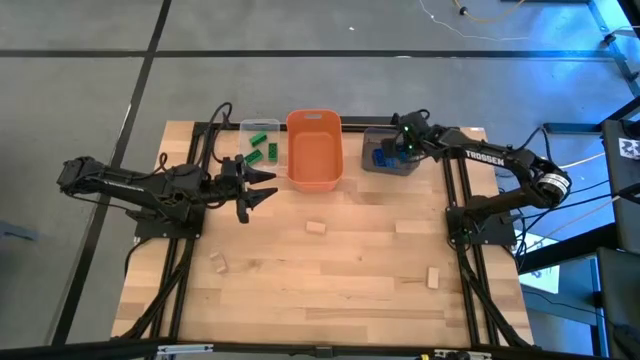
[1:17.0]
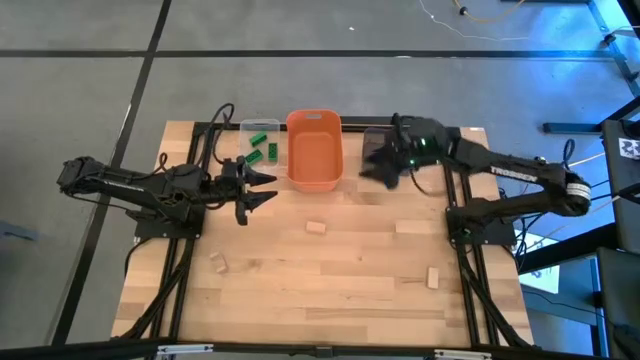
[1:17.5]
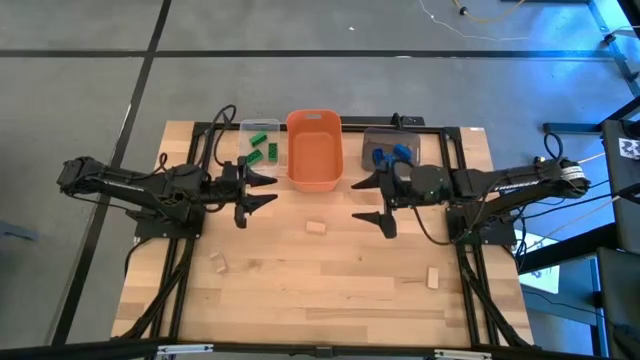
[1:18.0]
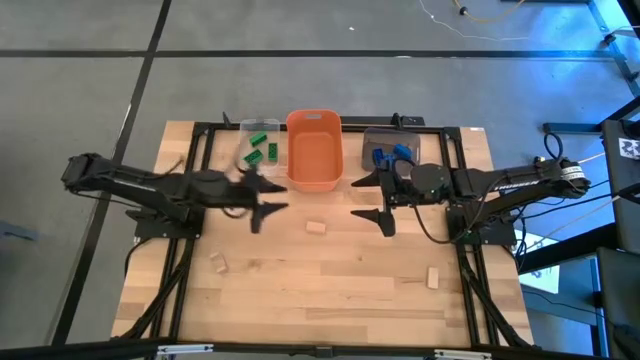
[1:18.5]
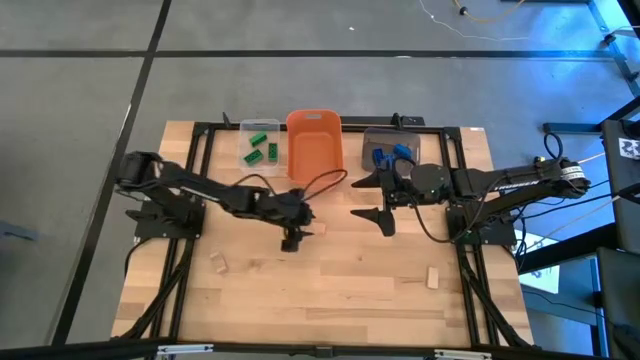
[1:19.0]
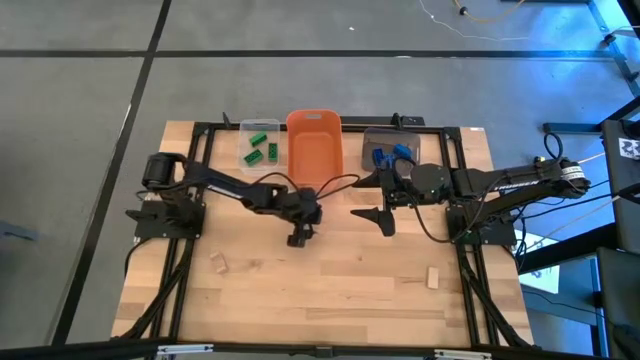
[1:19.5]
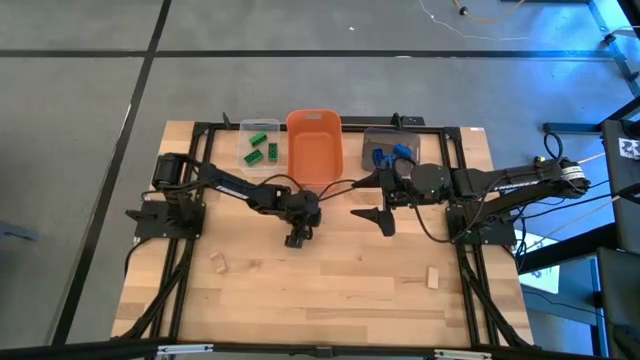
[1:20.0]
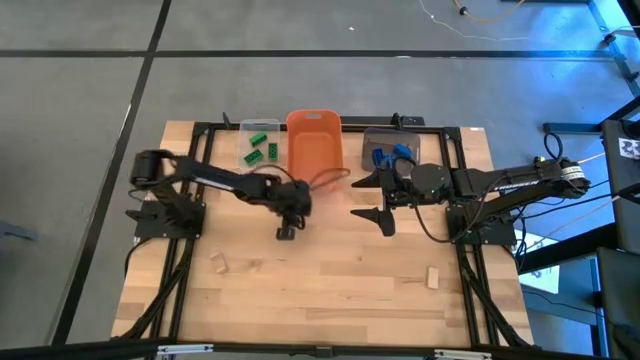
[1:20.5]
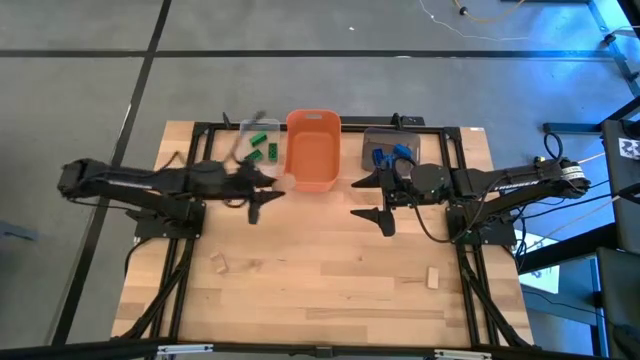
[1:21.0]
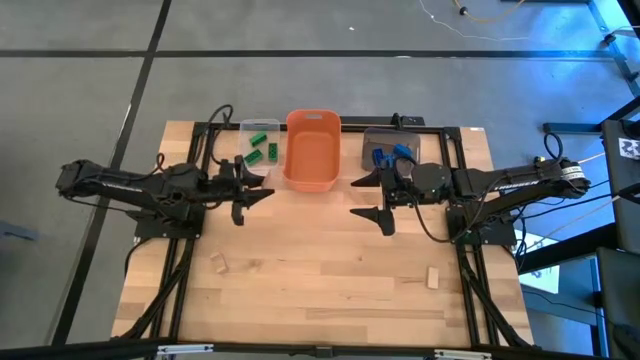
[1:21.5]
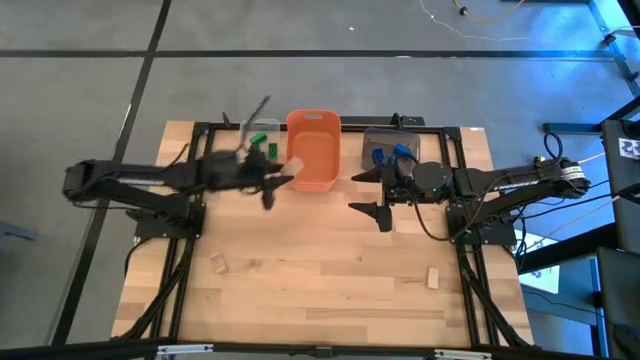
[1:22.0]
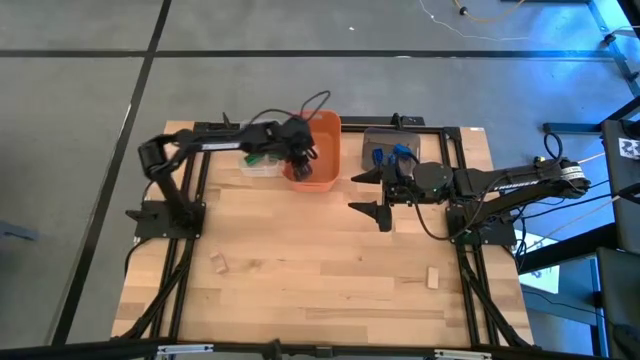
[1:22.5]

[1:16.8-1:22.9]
Task: Sort & place blocks by color
Put the top brown block into the orange bin

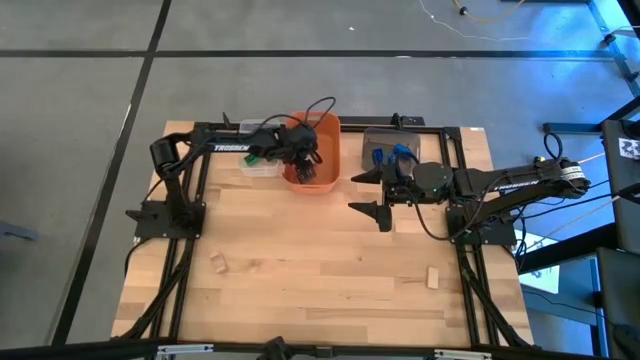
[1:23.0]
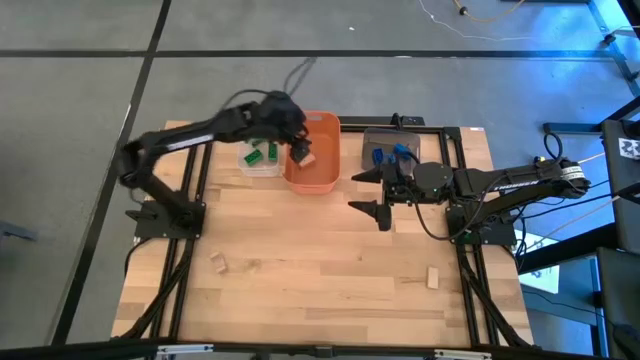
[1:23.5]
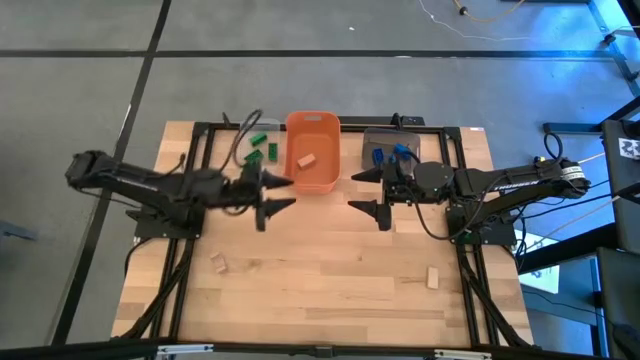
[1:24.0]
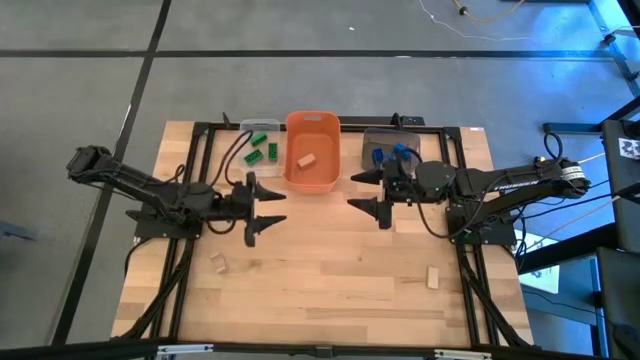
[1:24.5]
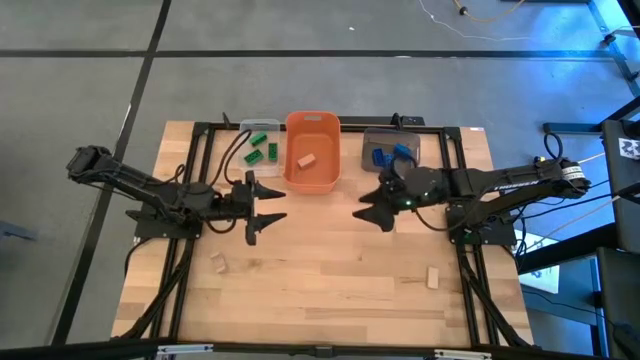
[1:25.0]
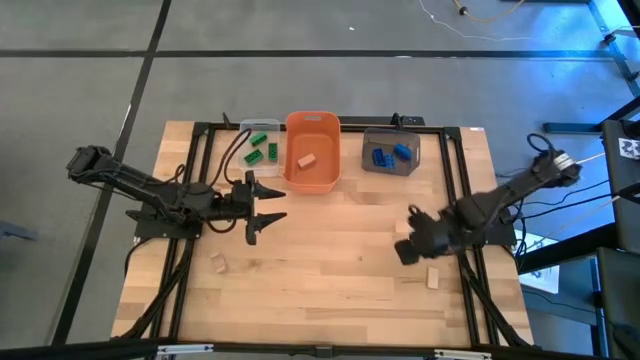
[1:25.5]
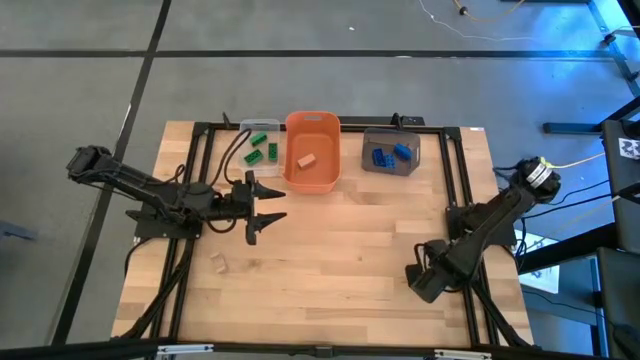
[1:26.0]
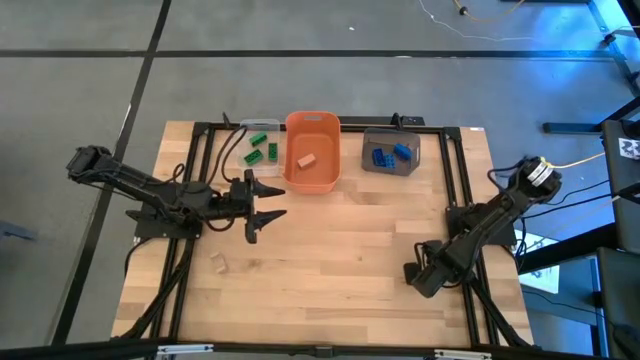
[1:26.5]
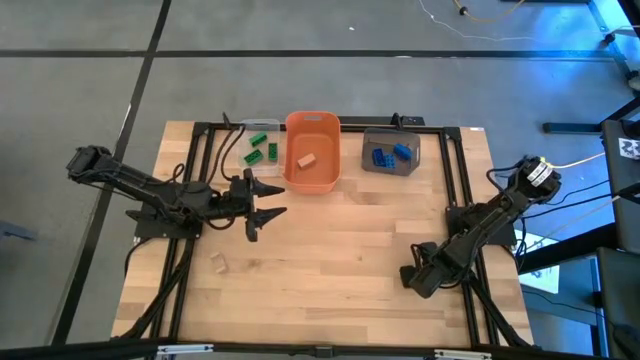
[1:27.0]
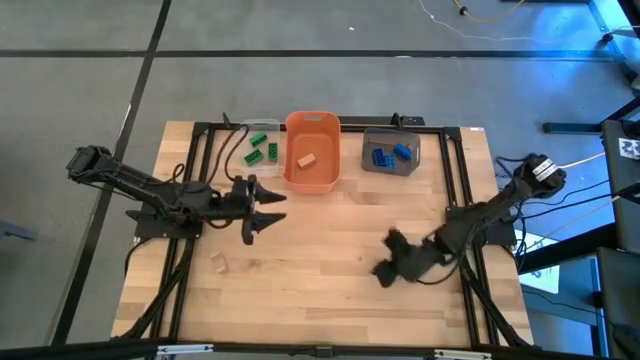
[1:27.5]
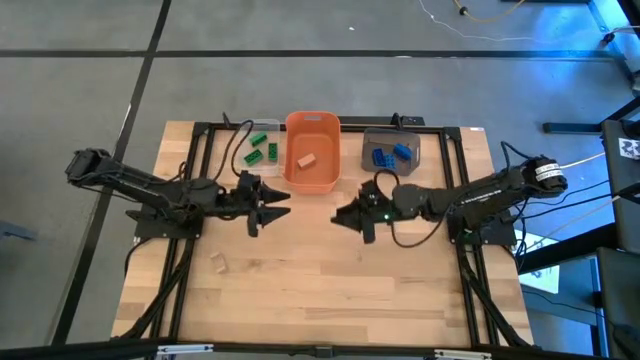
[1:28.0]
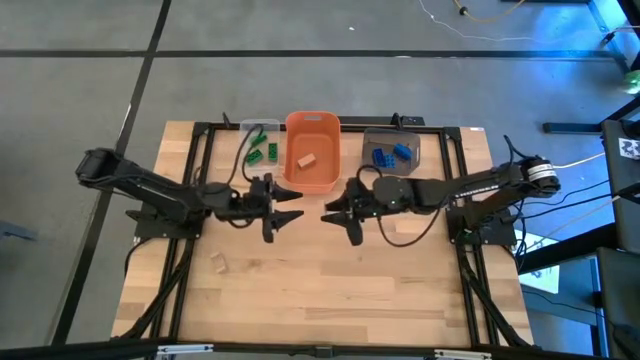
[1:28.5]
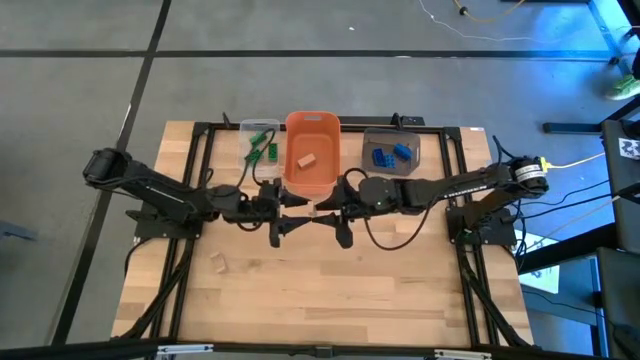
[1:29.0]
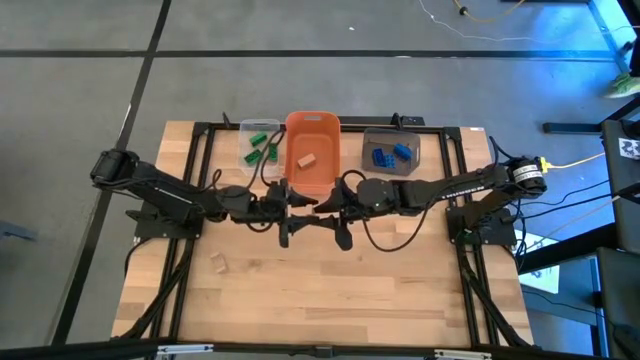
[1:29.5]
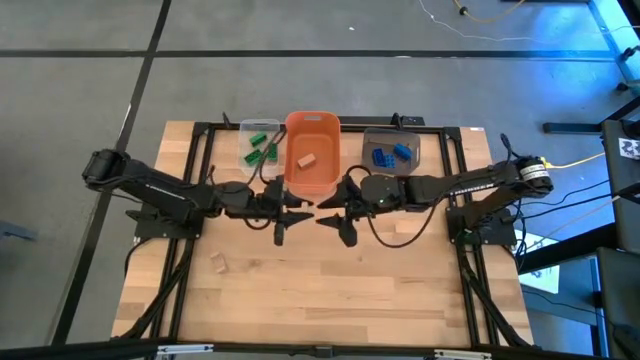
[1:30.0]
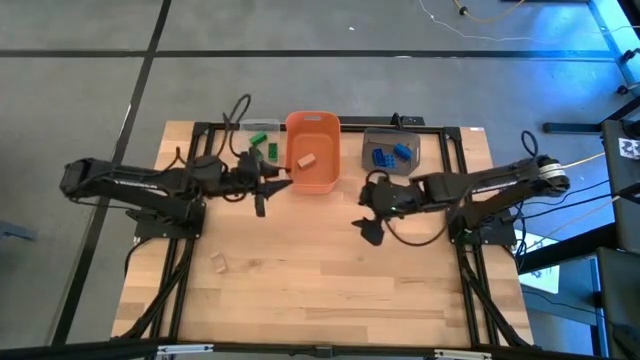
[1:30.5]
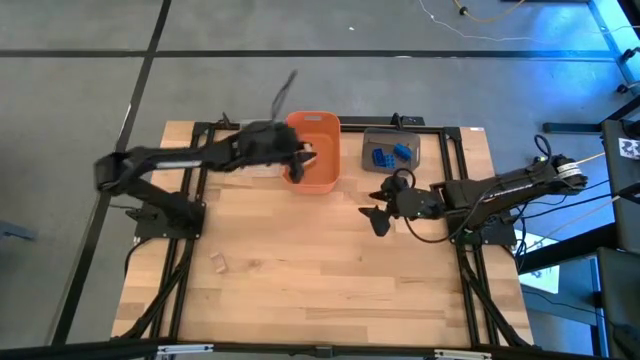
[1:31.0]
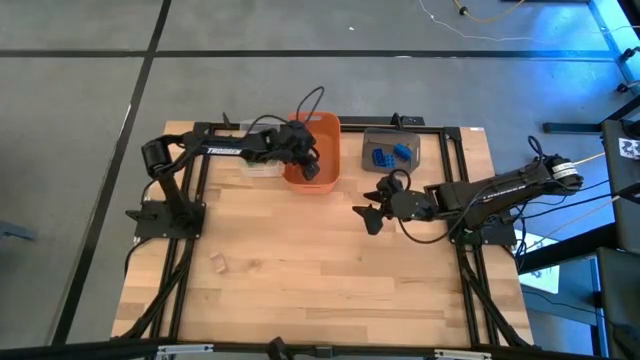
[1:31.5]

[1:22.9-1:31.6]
Put the right brown block into the orange bin

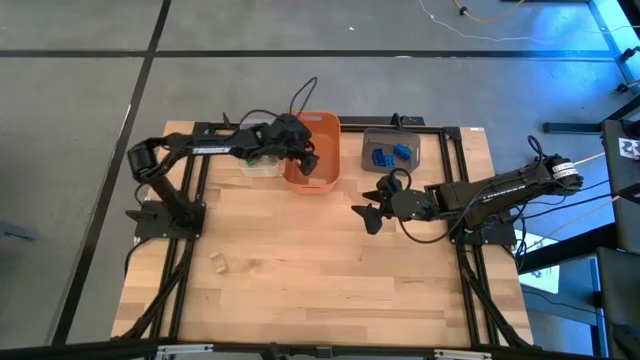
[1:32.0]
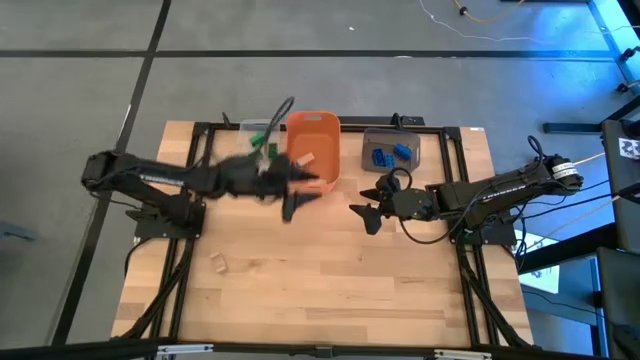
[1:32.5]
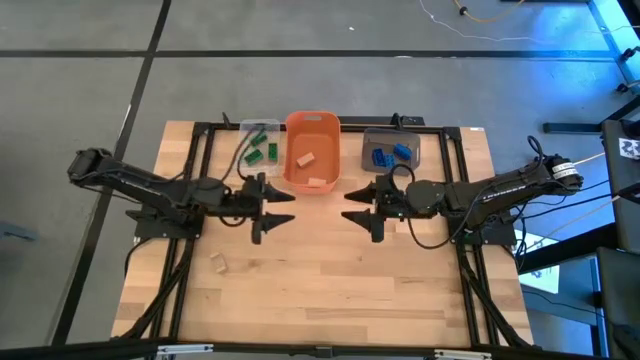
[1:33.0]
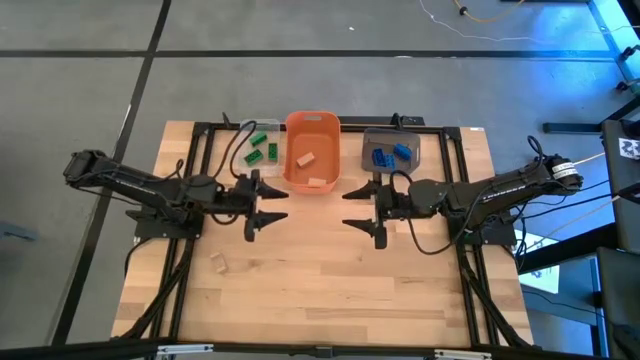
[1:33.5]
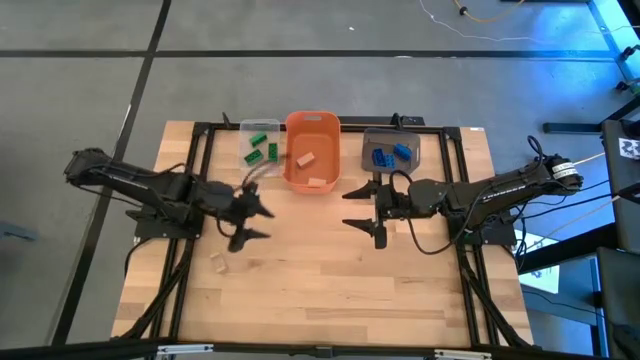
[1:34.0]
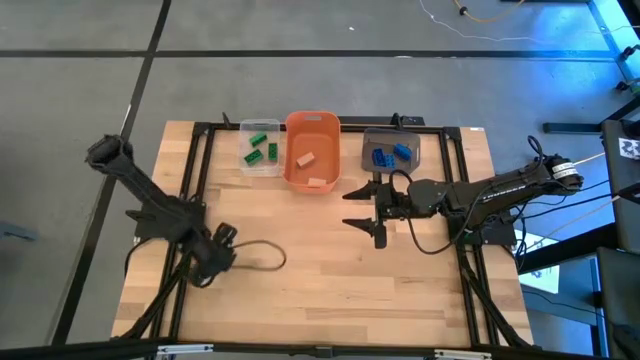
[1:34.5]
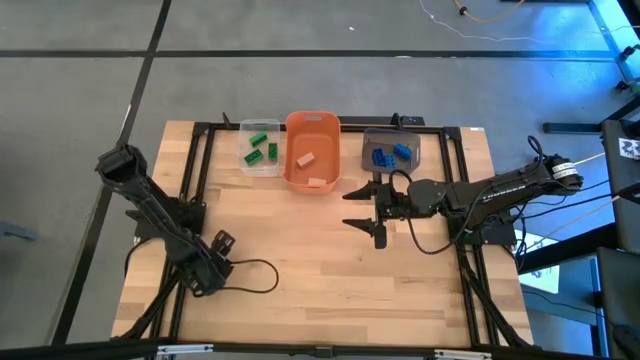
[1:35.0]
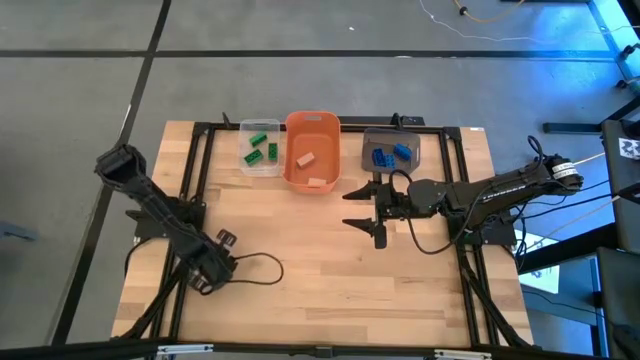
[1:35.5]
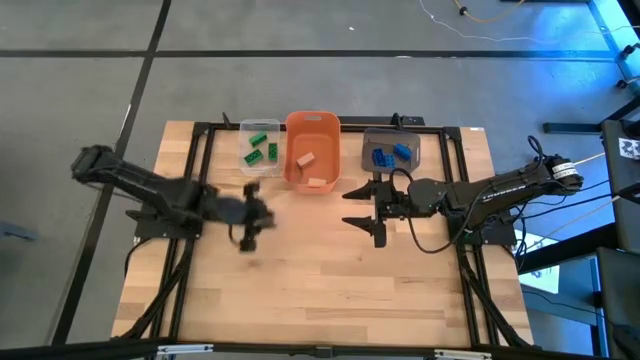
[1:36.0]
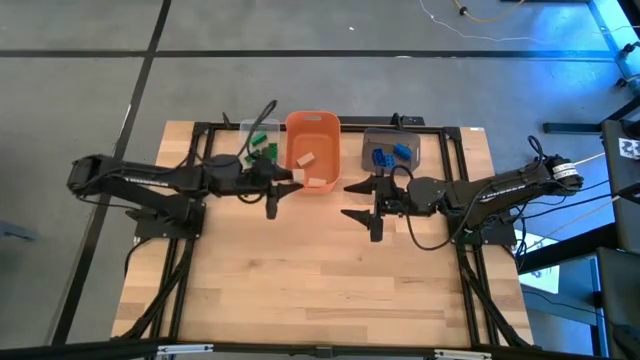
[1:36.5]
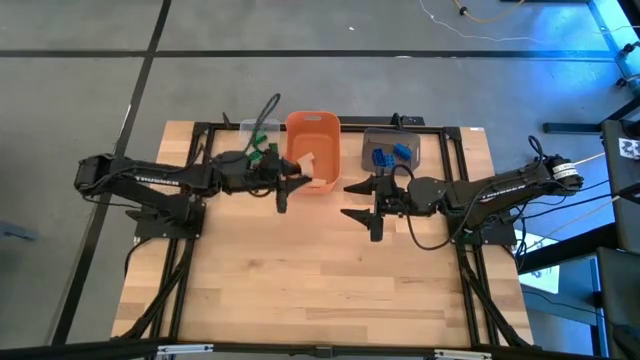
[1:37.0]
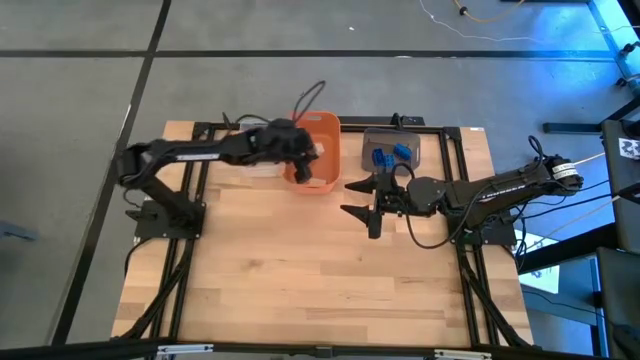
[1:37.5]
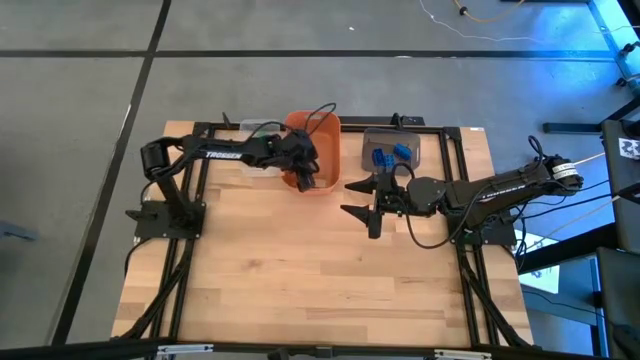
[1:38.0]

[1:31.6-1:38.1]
Put the brown block into the orange bin
